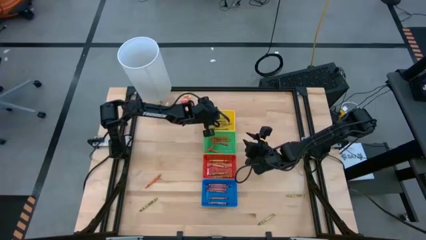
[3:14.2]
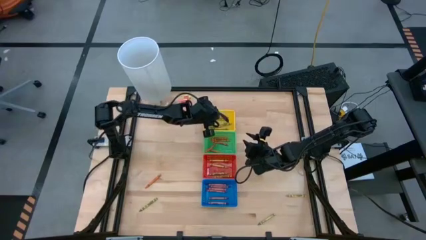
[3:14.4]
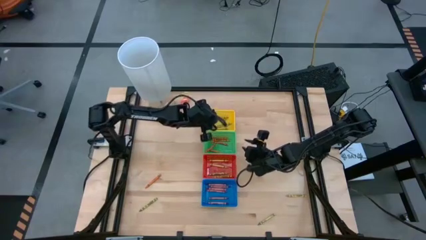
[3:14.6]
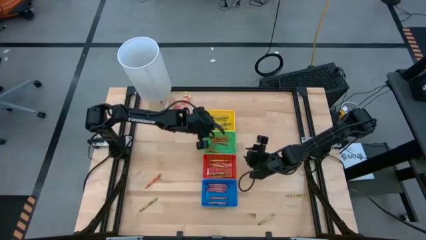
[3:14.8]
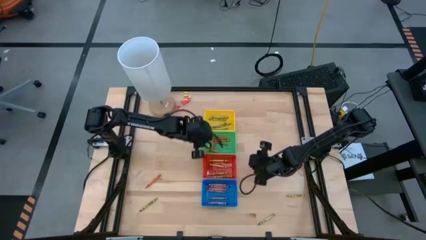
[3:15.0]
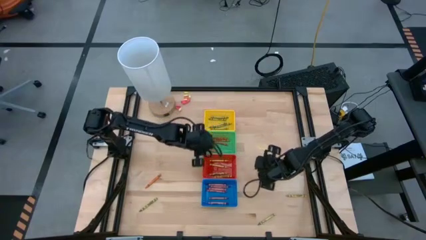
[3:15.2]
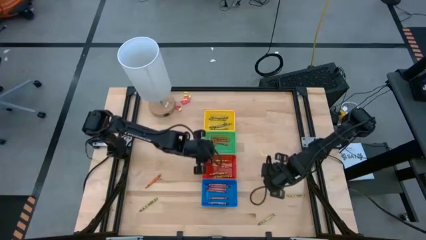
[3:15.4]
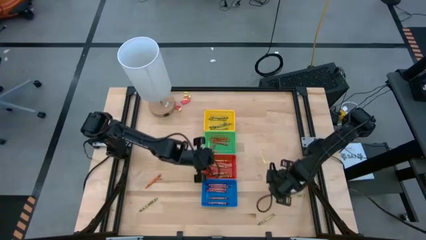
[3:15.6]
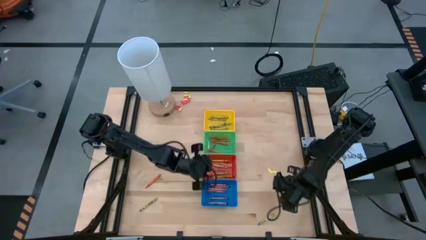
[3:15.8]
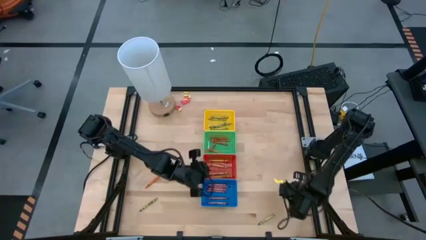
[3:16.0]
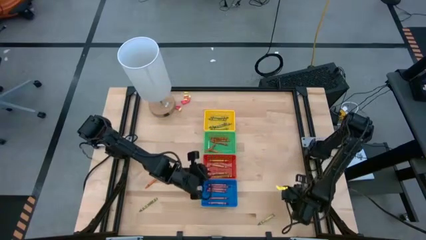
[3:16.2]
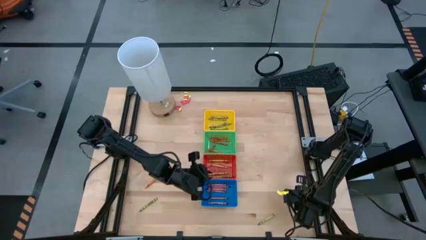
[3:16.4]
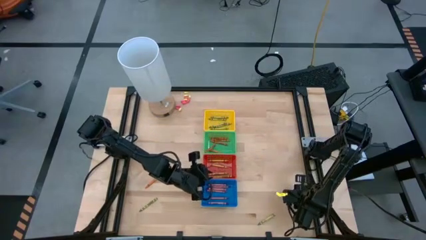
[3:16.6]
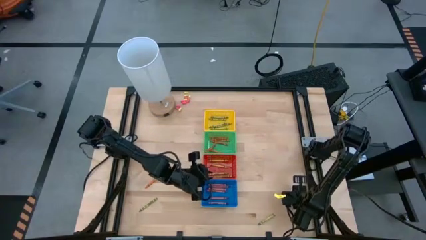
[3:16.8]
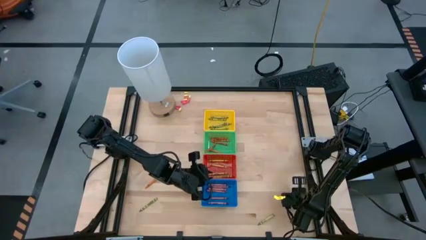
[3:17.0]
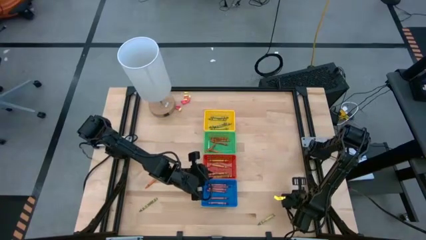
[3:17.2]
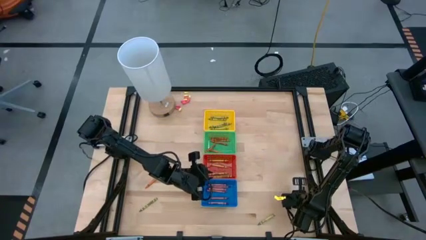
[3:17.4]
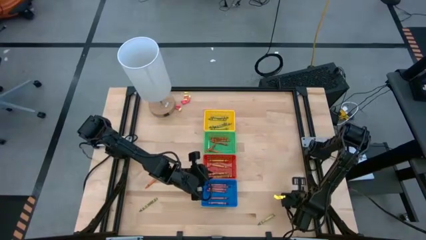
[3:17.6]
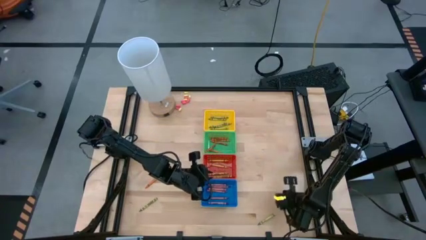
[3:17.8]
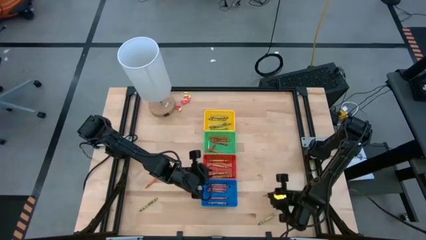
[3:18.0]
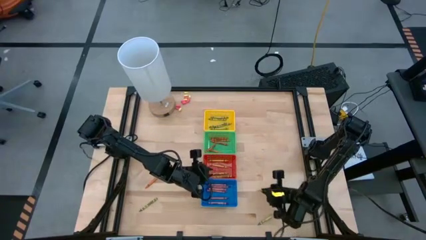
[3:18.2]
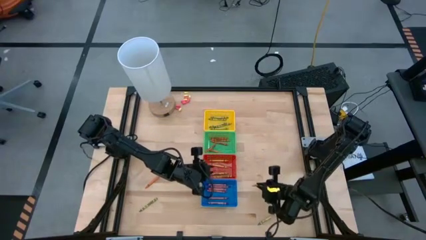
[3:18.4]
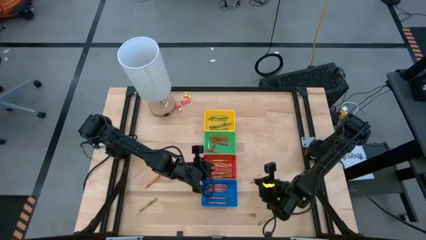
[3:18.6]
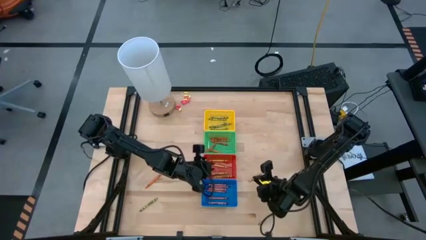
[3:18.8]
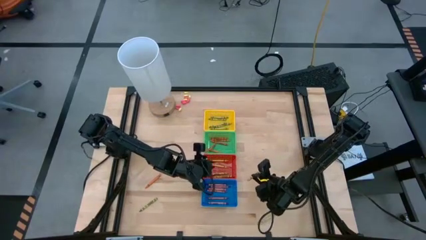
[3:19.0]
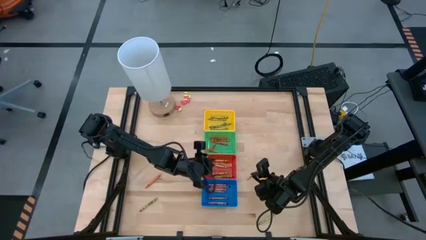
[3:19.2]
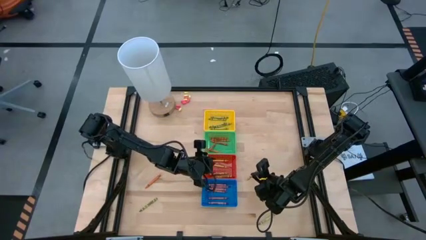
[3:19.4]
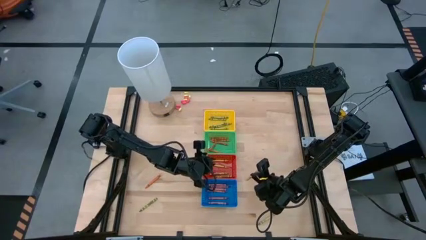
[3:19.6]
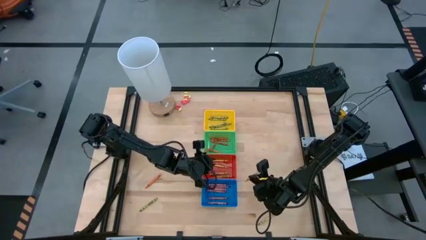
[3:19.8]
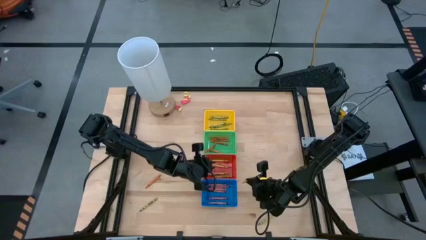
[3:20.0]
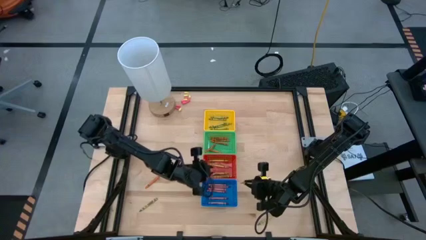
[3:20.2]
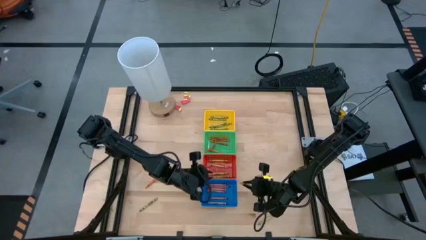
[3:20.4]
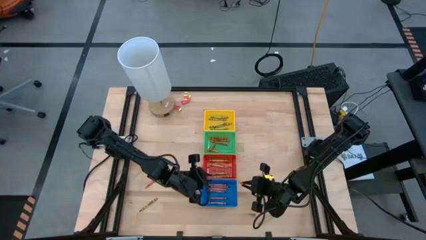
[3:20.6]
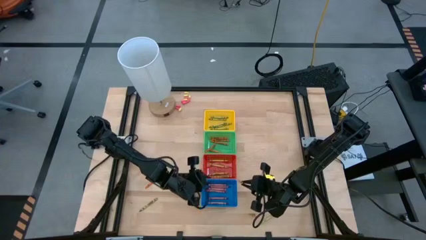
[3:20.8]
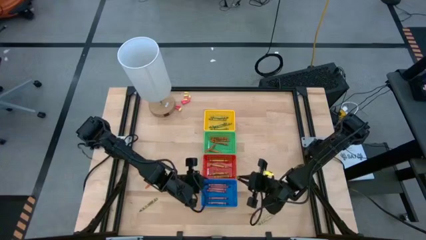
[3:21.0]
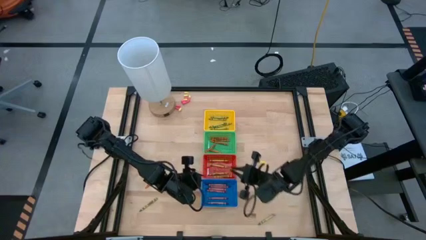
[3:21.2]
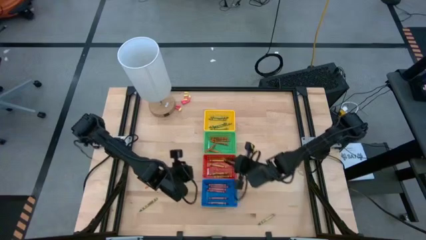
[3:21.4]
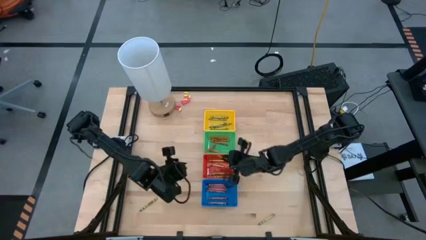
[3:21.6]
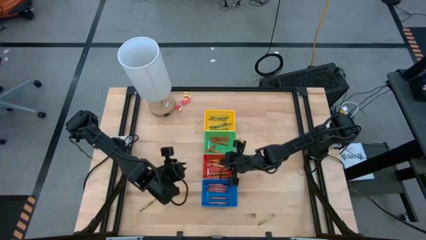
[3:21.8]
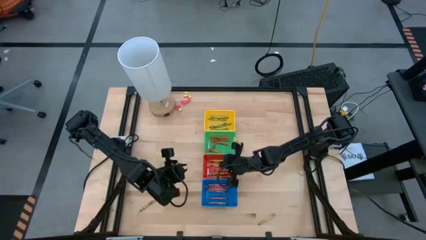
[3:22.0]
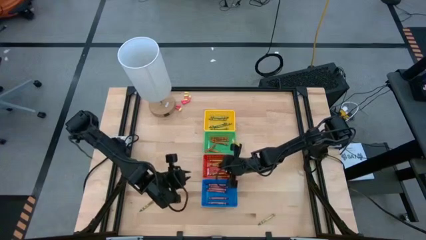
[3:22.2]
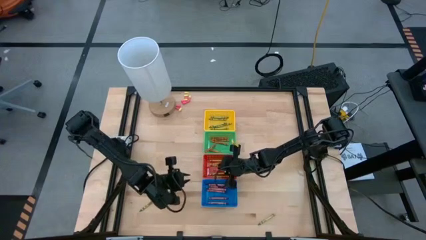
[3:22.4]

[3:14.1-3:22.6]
Task: Sort crayons
Put the yellow crayon into the red bin

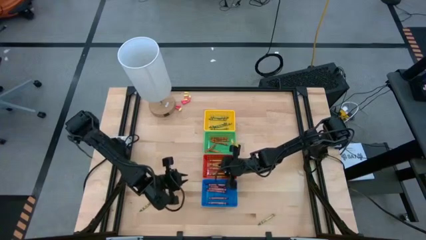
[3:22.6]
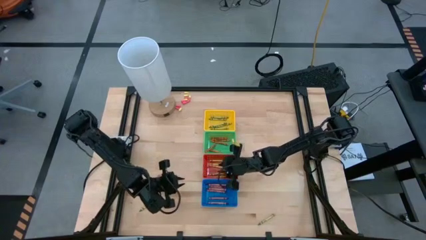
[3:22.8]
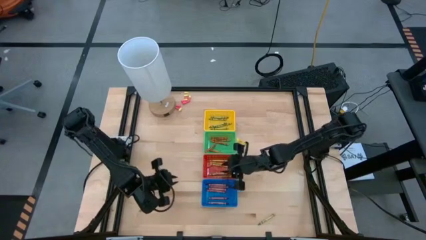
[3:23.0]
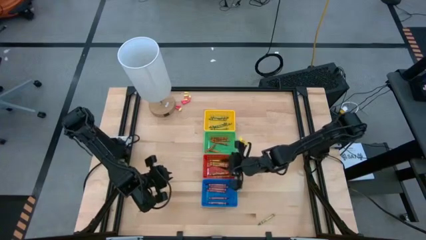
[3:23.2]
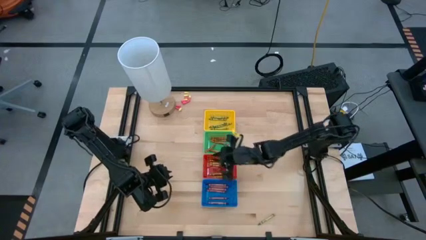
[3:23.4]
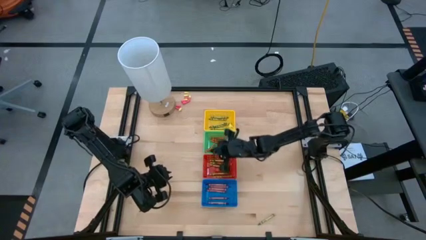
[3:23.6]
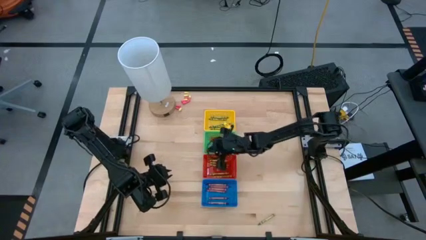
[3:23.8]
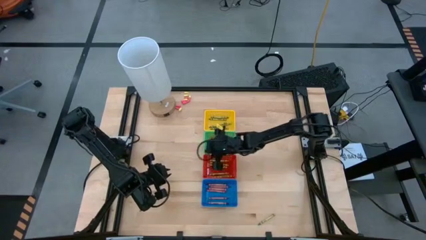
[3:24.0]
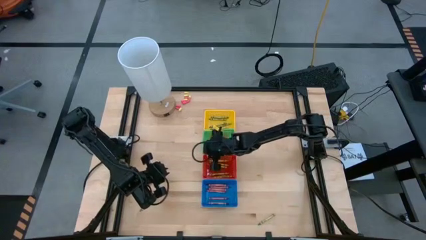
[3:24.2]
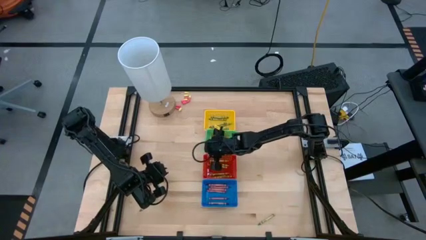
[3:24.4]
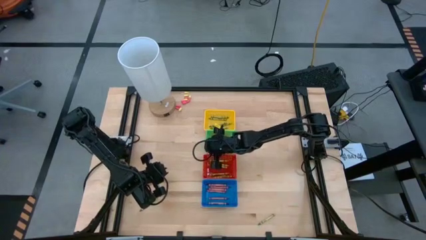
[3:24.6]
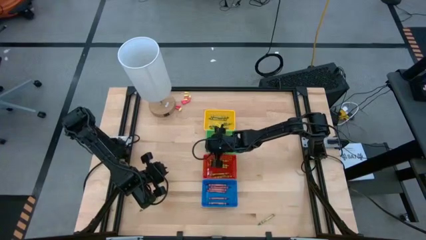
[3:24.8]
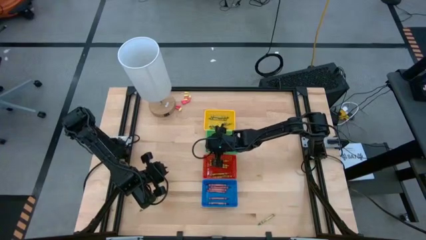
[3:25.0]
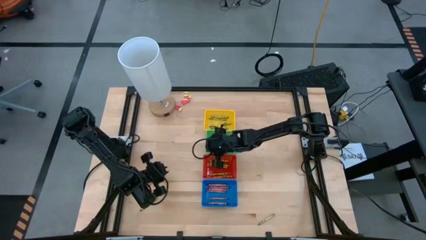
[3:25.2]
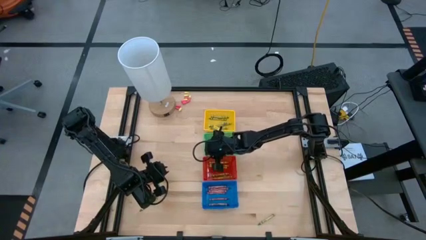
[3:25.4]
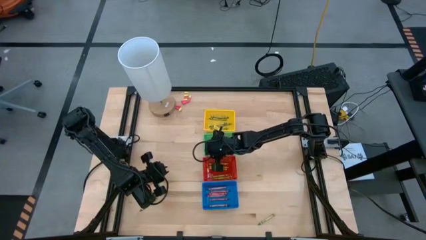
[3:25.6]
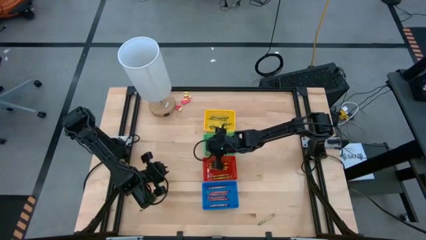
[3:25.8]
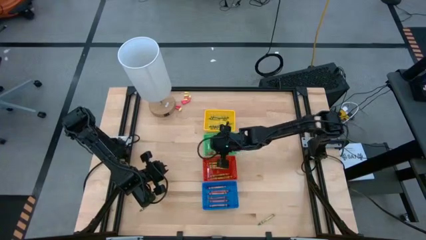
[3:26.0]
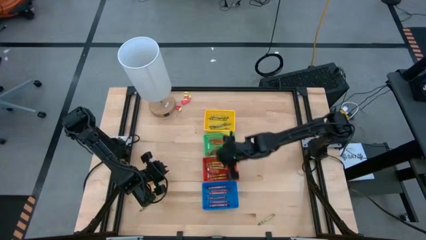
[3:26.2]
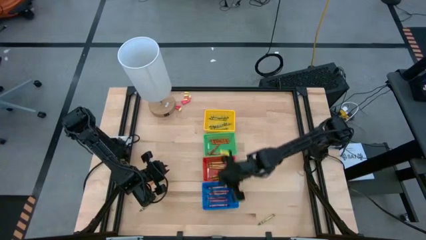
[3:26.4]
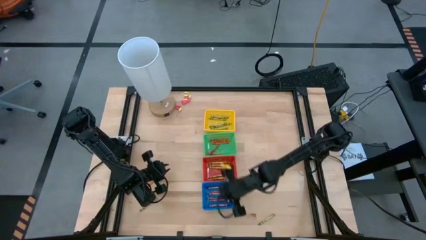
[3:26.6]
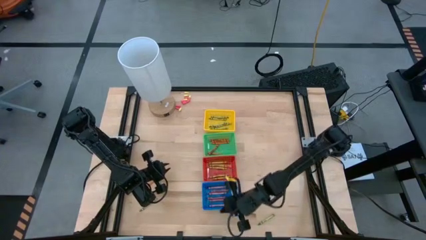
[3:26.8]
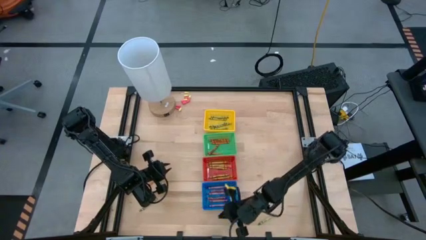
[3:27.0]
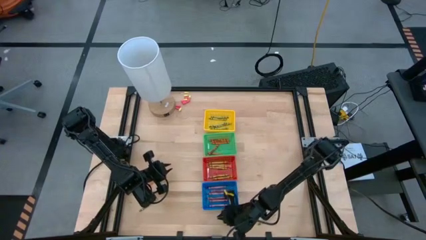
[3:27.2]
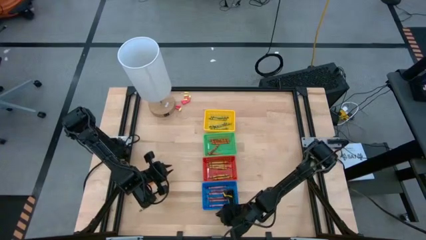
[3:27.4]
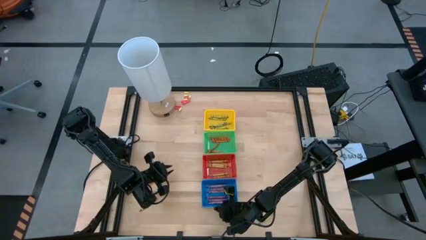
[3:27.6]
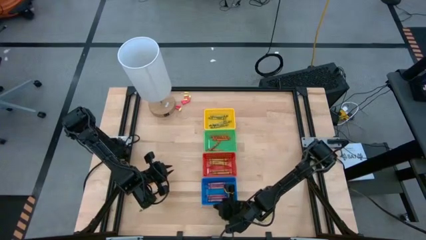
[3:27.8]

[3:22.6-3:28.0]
Adjust the bins

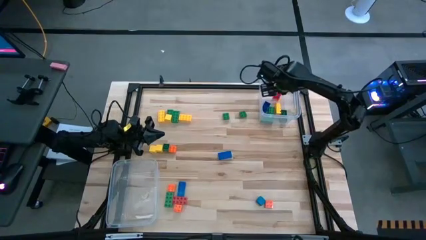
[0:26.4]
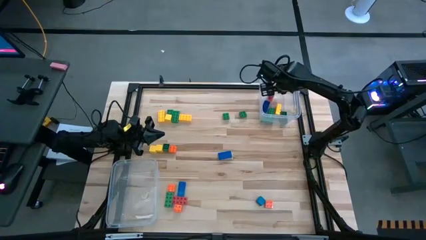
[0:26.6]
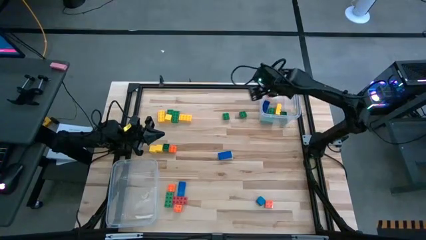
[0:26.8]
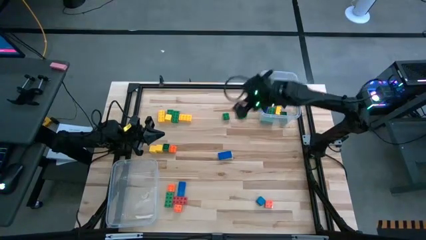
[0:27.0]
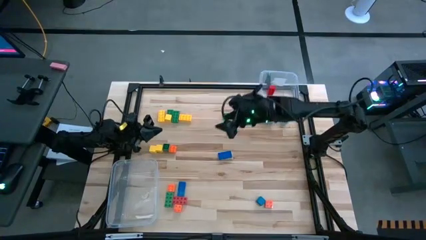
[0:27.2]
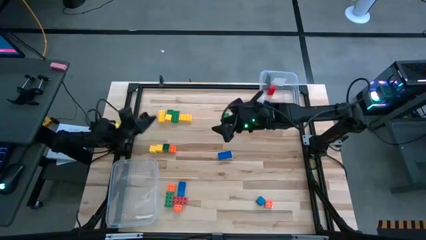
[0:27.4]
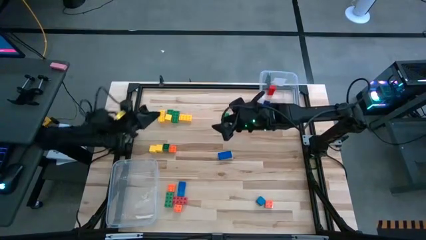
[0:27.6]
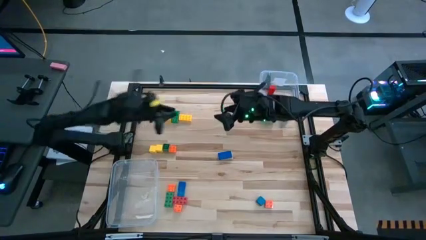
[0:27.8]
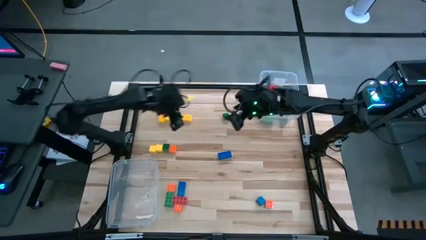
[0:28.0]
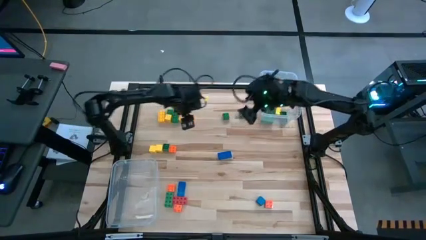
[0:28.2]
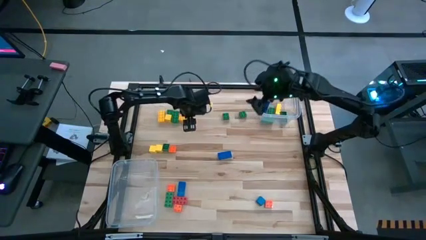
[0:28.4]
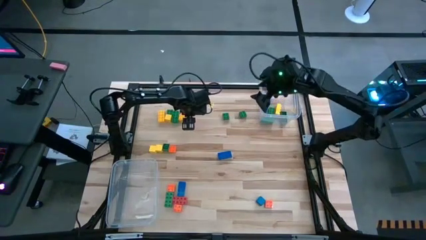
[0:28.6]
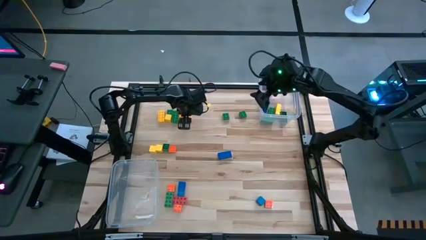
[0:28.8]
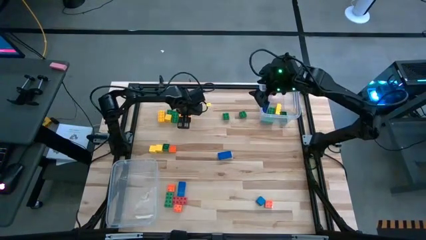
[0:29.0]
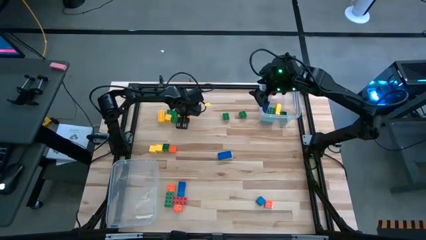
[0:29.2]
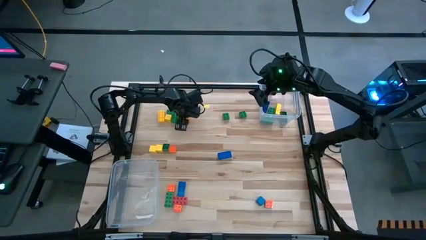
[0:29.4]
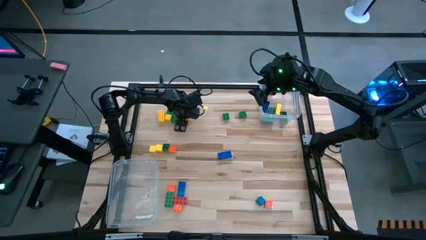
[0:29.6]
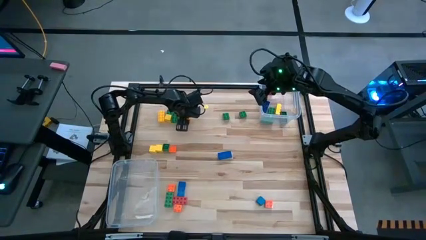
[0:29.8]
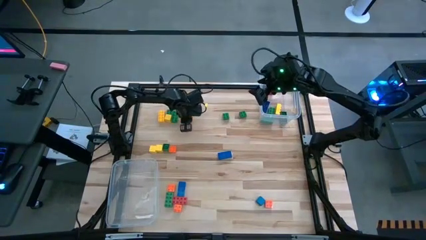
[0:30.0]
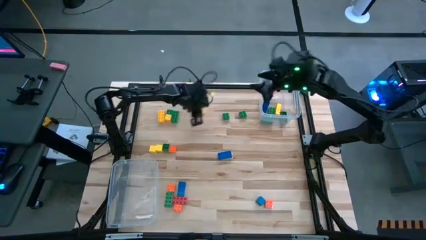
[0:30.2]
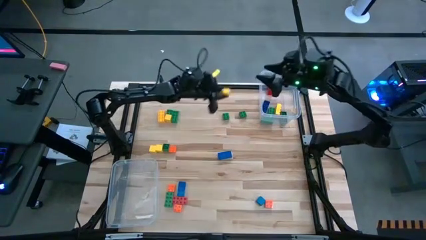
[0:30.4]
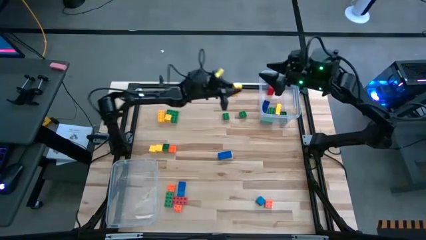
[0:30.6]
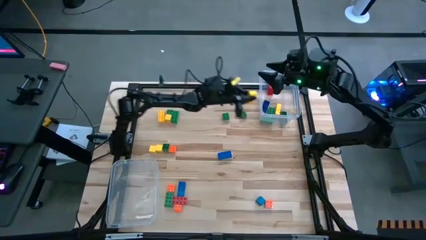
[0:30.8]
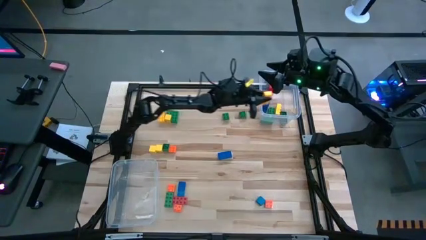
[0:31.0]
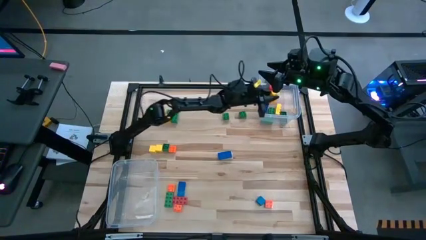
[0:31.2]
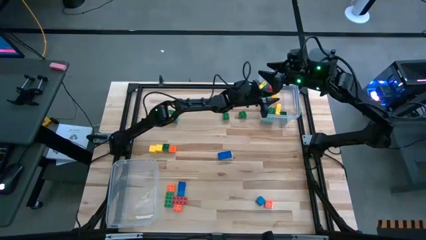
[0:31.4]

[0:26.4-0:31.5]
Task: Sort blocks by size
Put the right large yellow game piece into the right transparent bin
